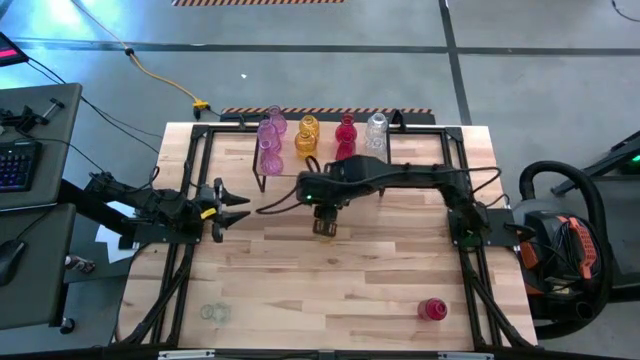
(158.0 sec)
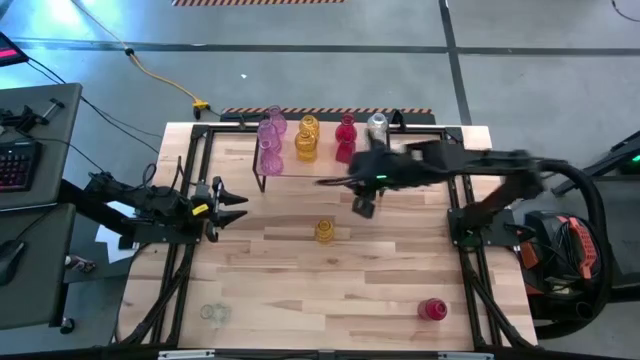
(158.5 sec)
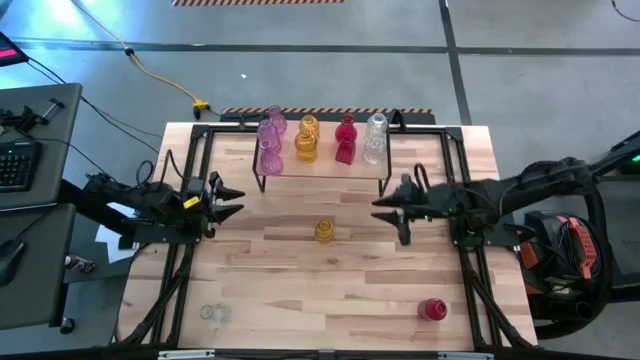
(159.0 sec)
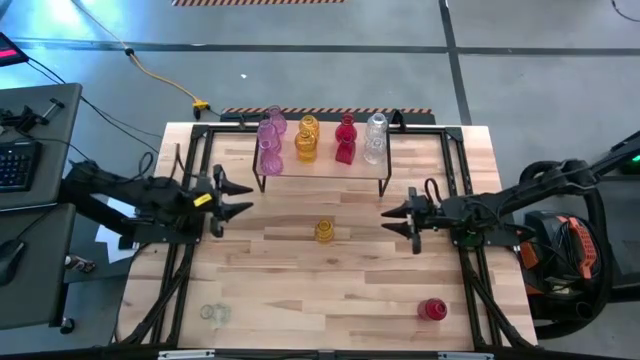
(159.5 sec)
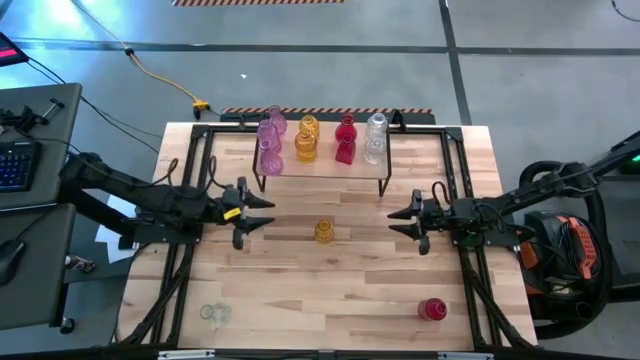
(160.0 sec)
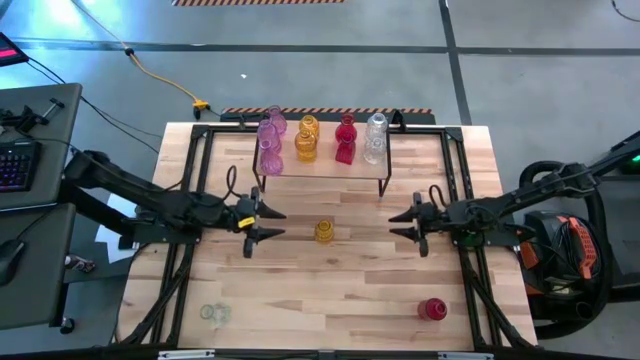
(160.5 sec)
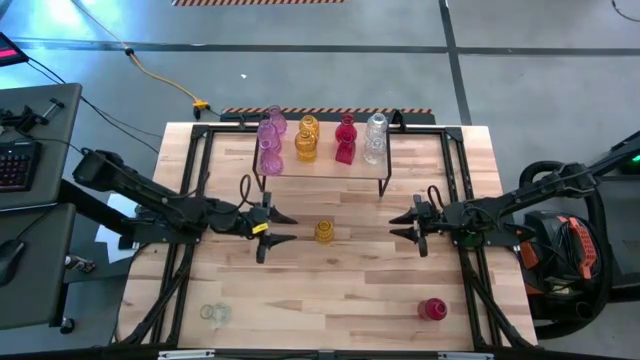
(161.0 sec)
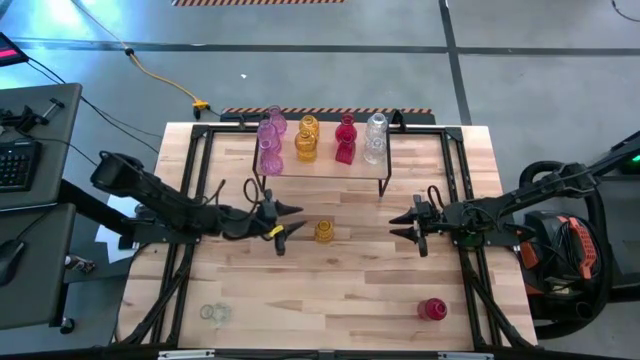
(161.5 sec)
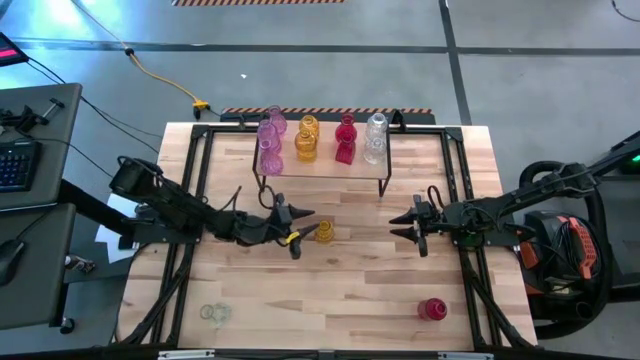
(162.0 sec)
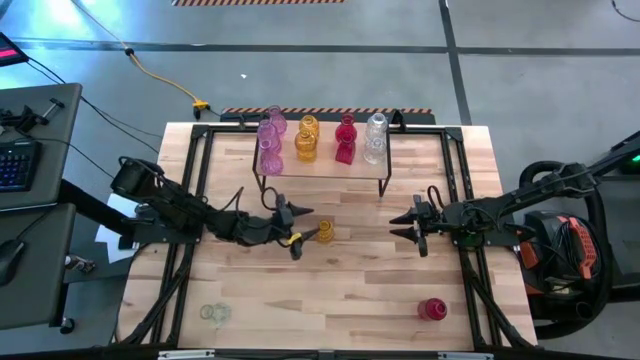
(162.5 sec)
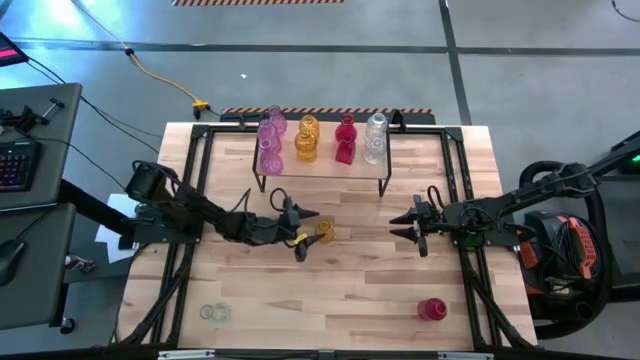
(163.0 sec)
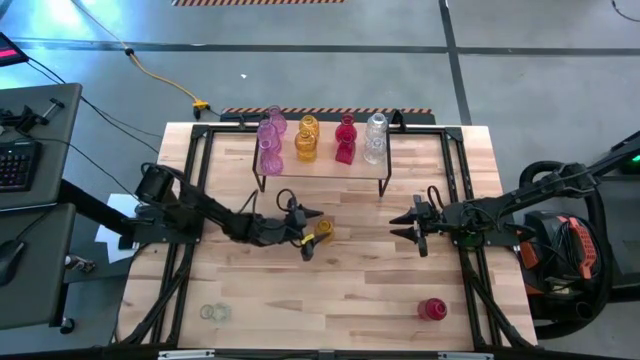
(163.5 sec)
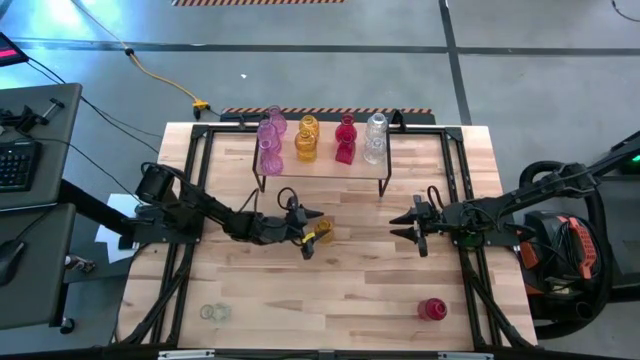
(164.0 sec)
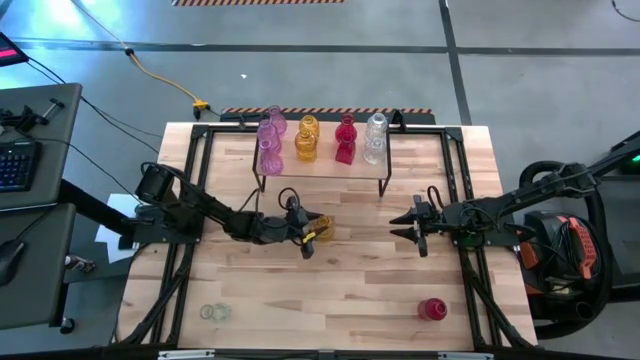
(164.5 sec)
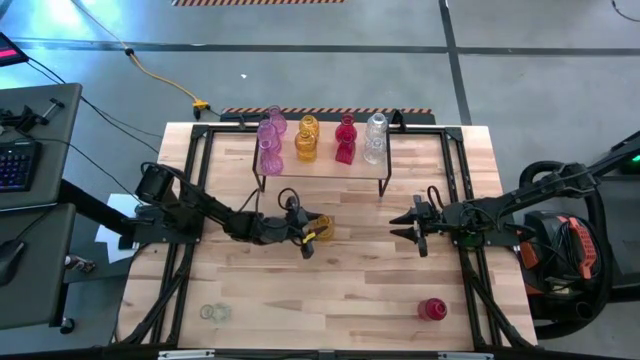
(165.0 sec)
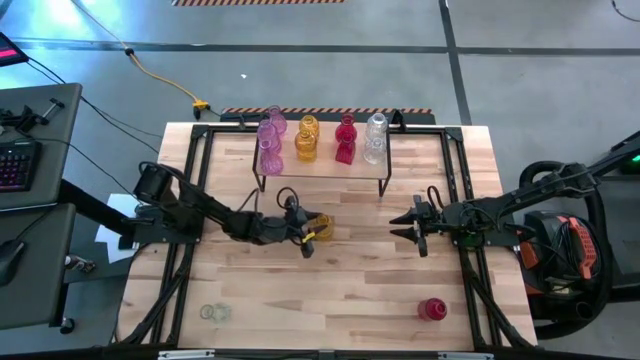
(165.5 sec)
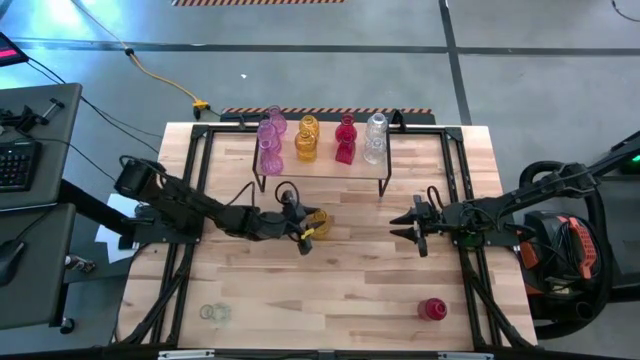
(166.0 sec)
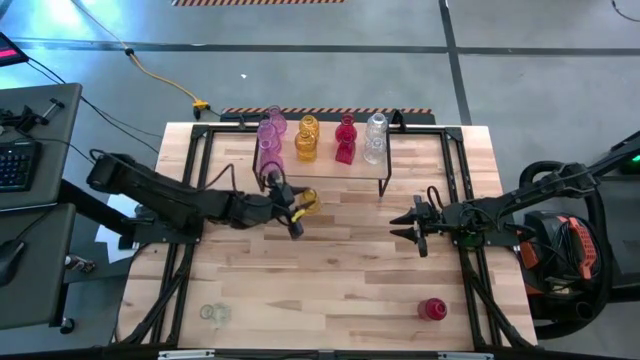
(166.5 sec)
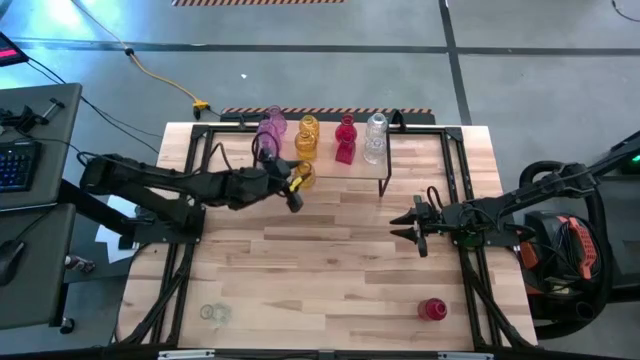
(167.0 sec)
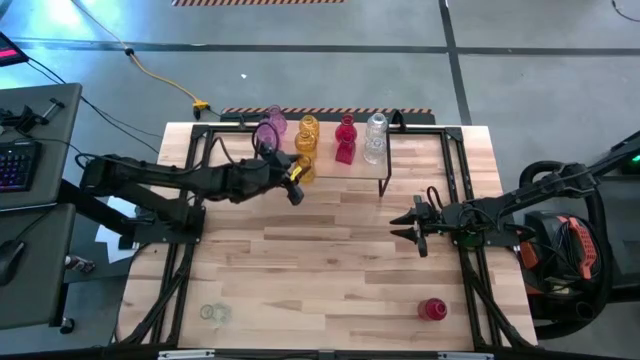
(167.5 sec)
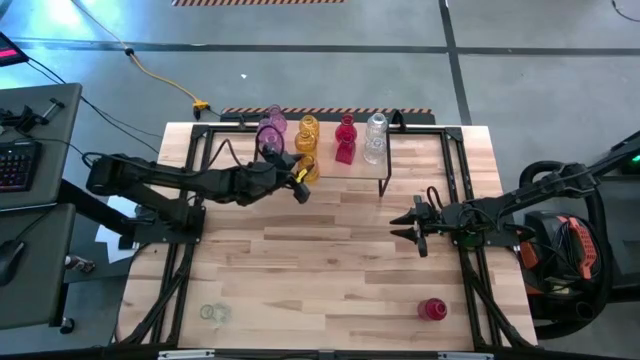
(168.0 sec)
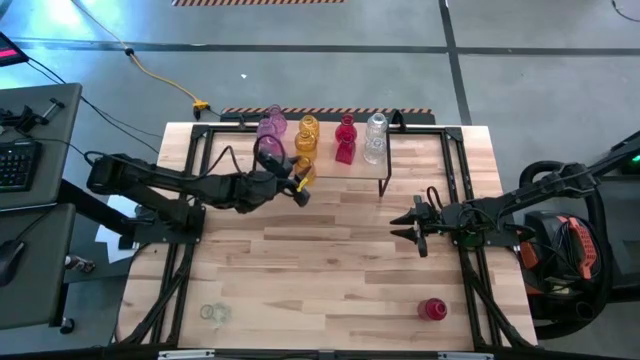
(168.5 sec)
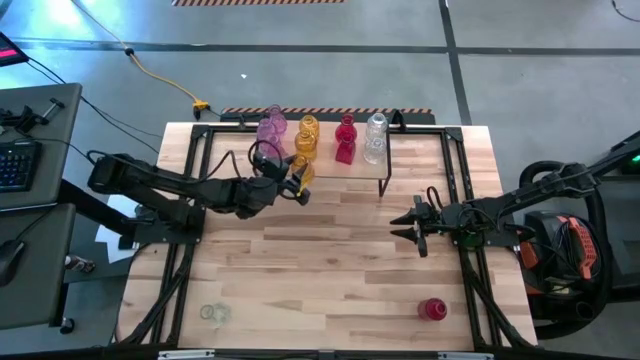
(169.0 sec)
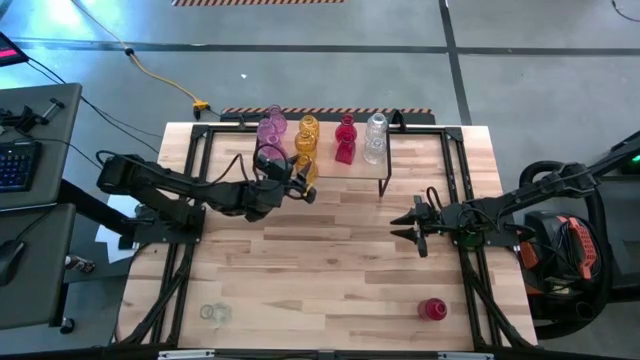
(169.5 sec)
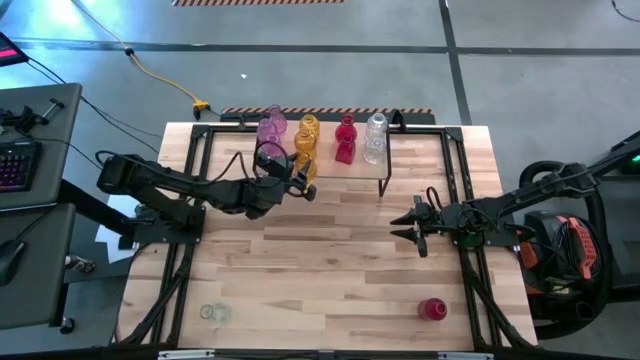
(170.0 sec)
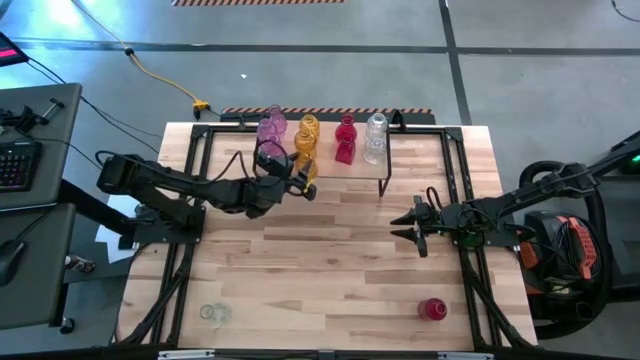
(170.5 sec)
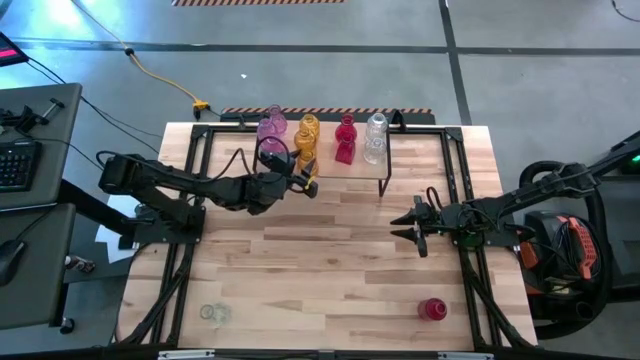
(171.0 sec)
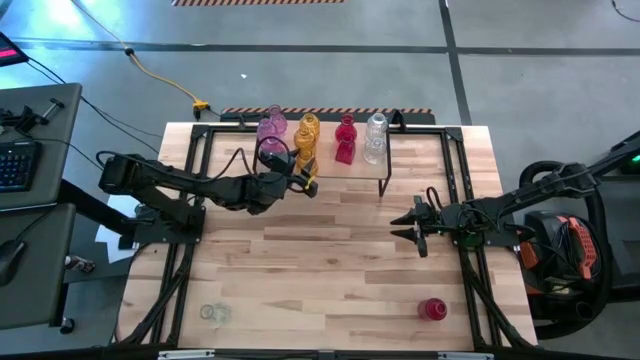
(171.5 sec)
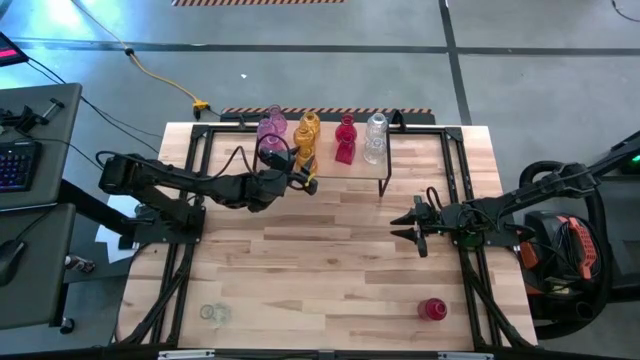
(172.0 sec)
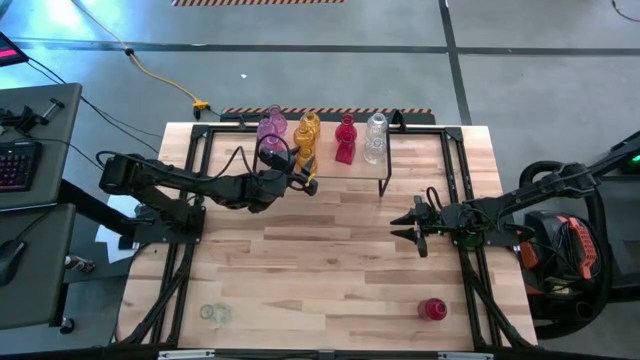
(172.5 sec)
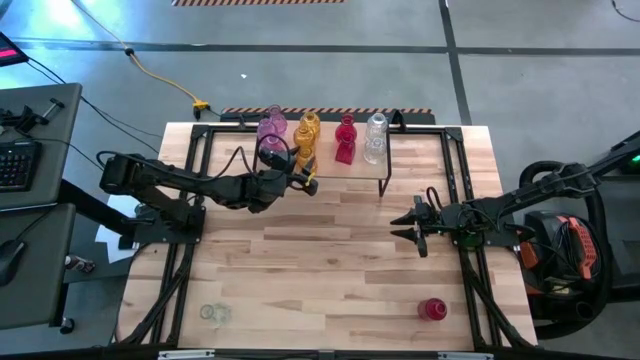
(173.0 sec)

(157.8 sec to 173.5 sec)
Task: sort vases onto shelf
Put the yellow vase on the shelf aligned with the other yellow vases

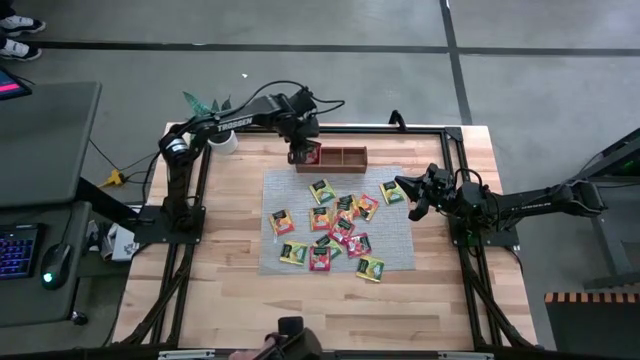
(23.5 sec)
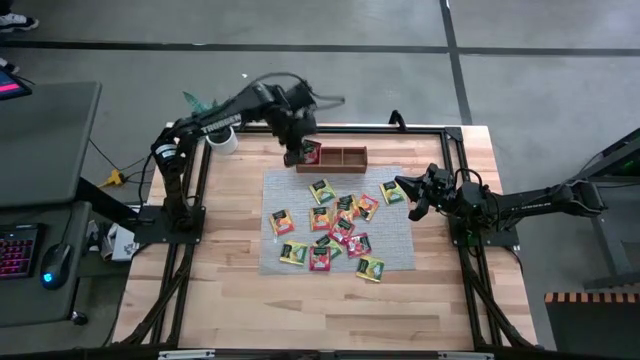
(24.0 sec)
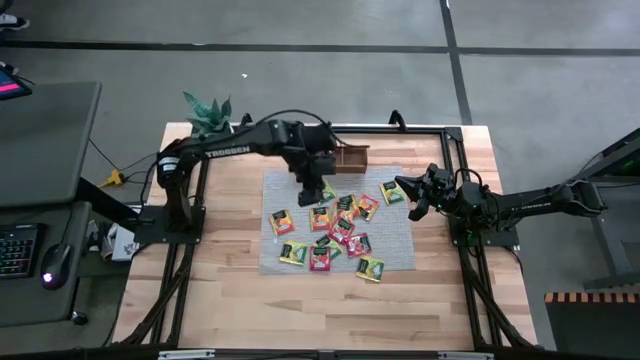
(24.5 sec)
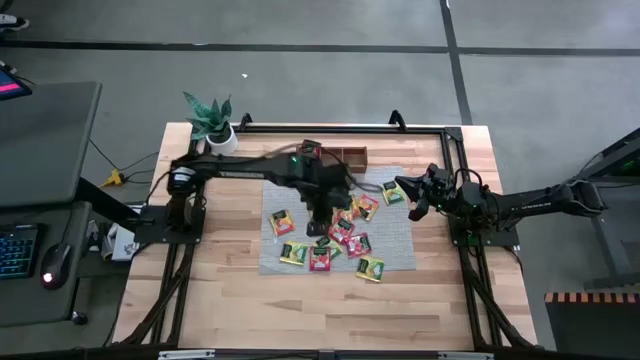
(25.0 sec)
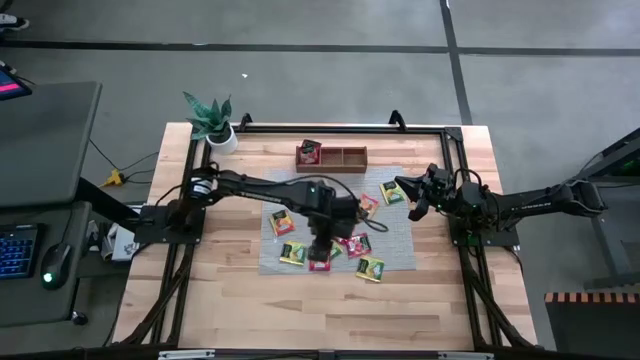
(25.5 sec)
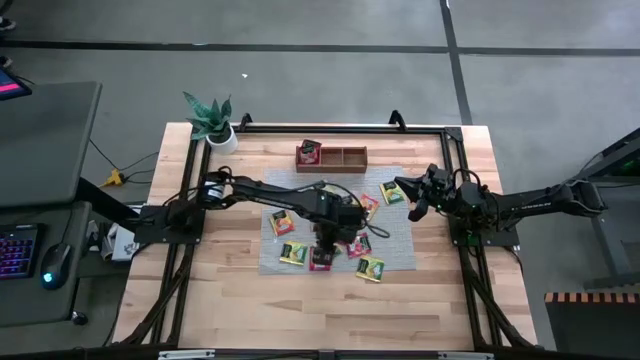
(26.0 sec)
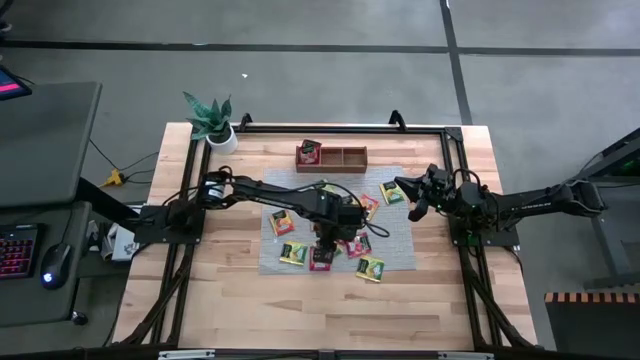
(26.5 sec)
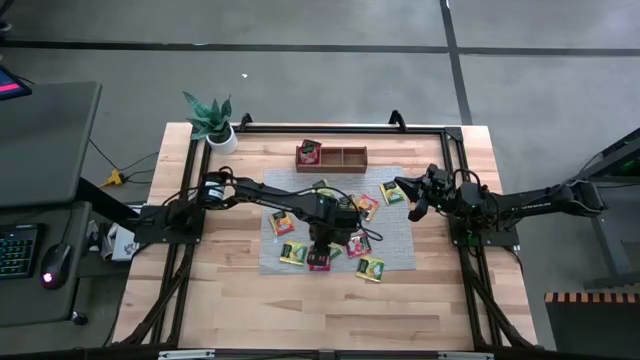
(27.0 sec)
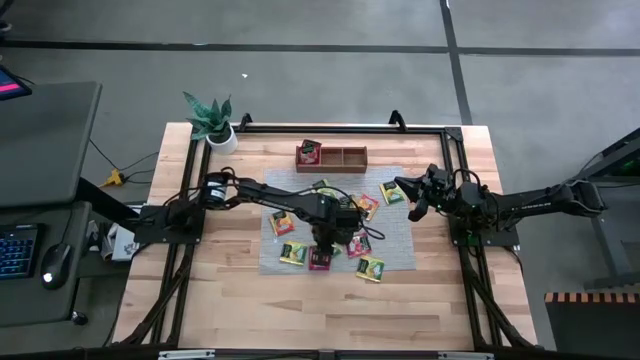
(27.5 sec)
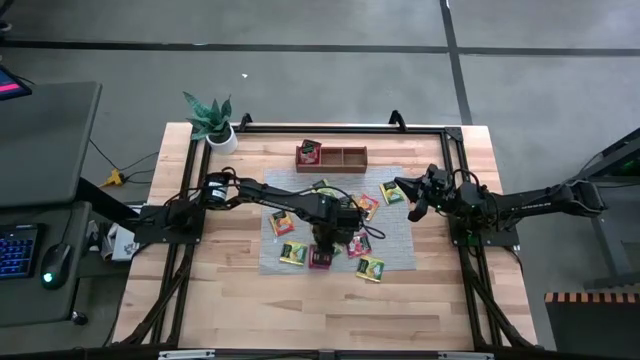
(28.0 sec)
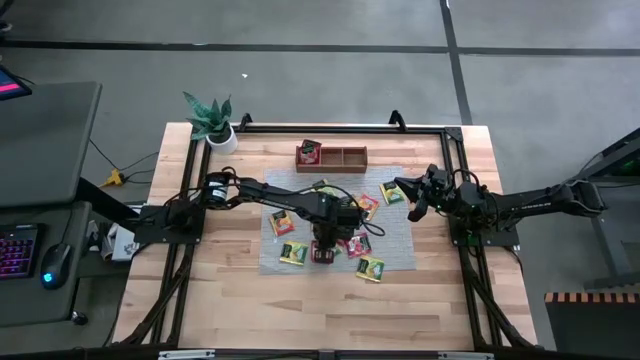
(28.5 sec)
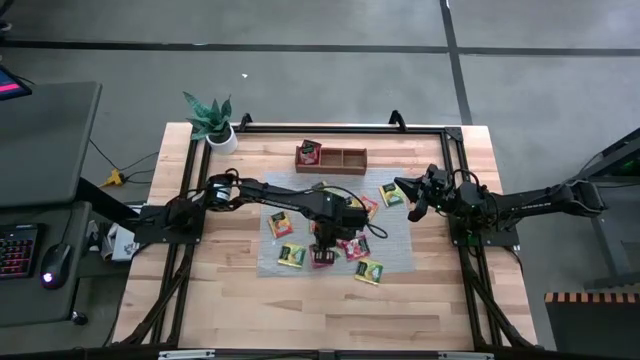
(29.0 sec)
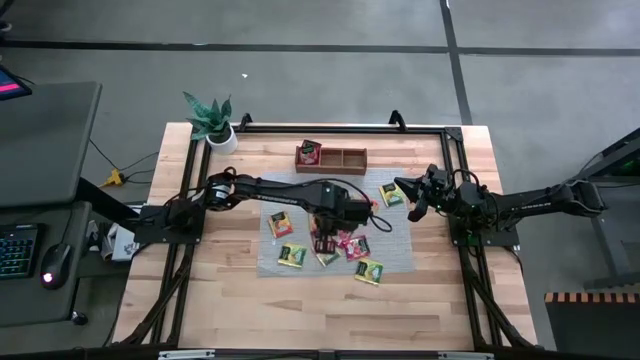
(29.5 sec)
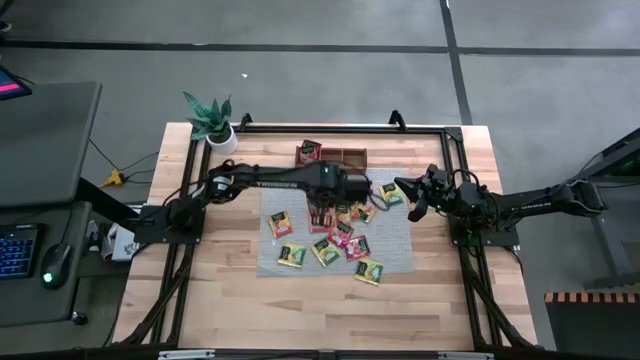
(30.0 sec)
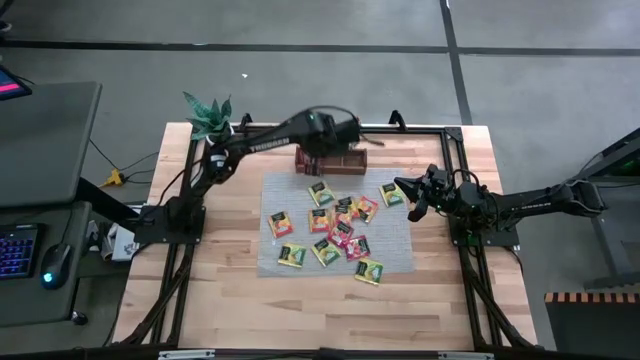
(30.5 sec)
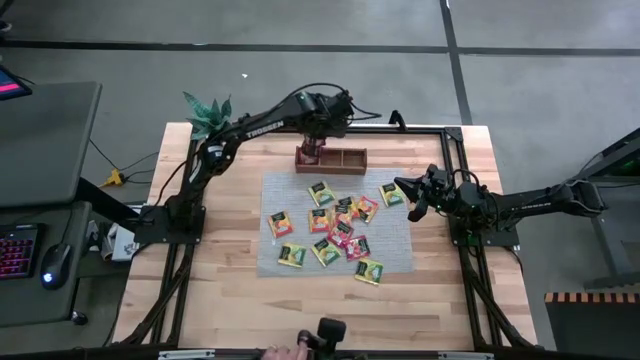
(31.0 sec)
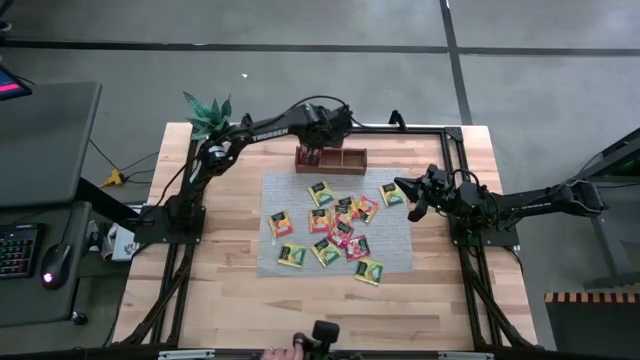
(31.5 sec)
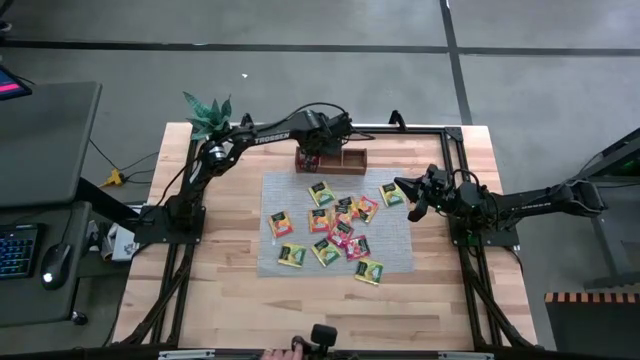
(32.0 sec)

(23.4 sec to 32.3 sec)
Task: Pick & Place Tea
Put the red tea bag into the left section of the wooden organizer
